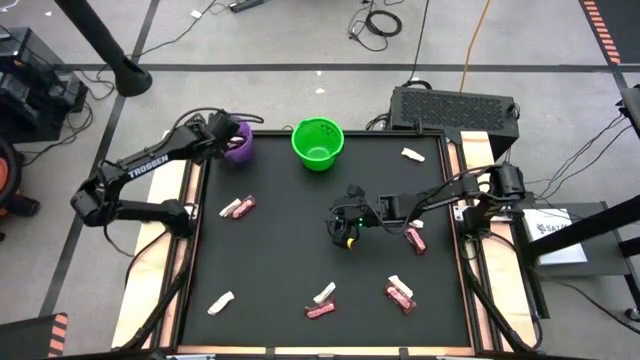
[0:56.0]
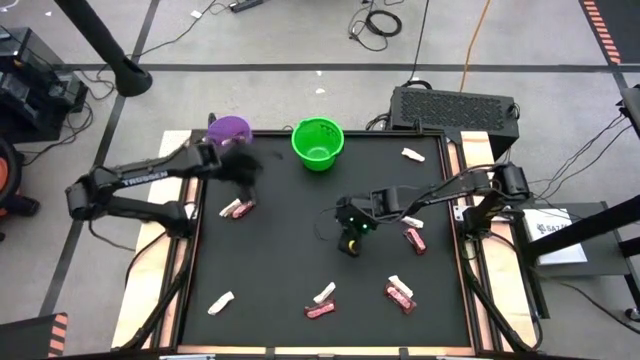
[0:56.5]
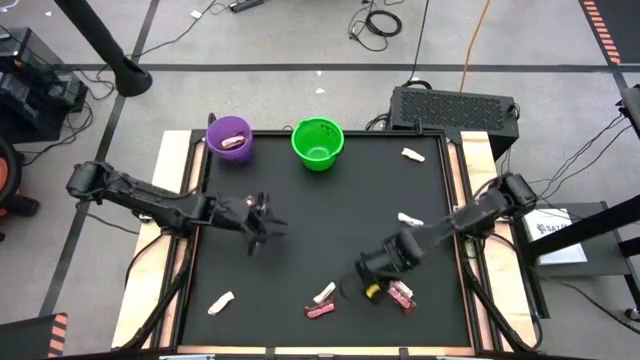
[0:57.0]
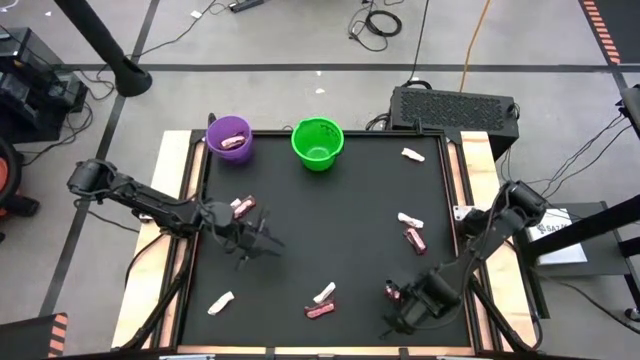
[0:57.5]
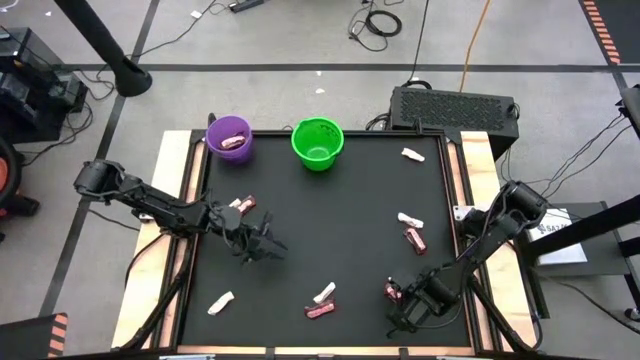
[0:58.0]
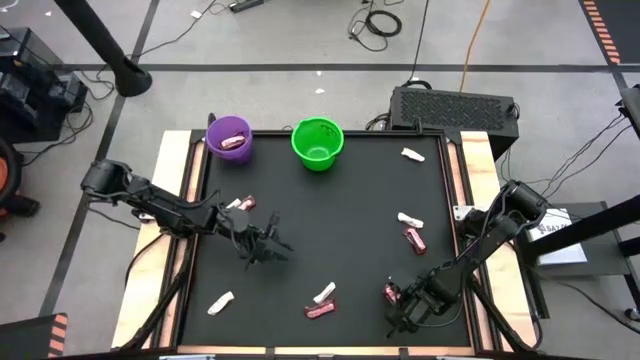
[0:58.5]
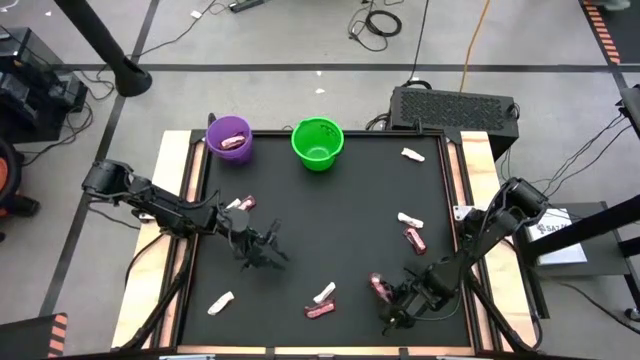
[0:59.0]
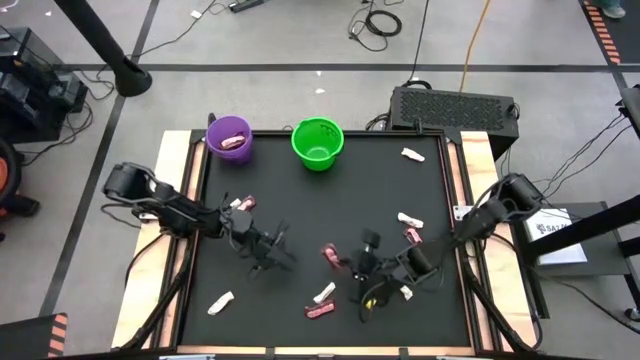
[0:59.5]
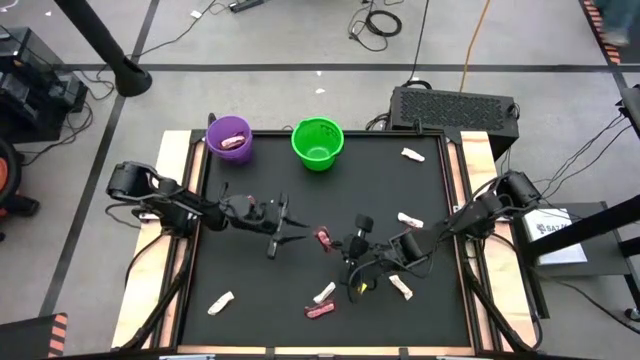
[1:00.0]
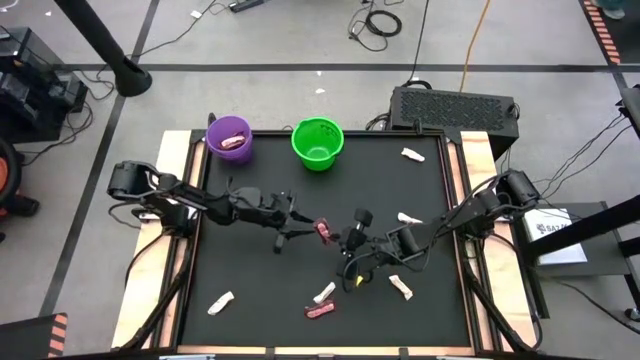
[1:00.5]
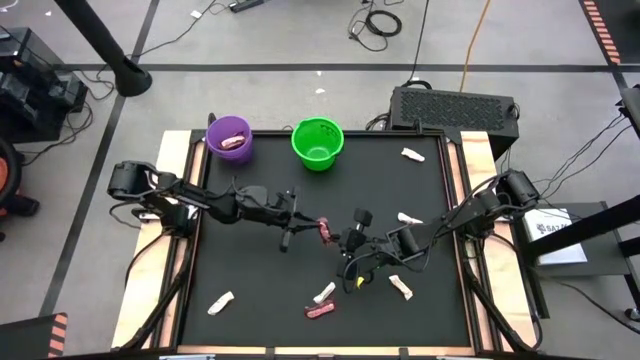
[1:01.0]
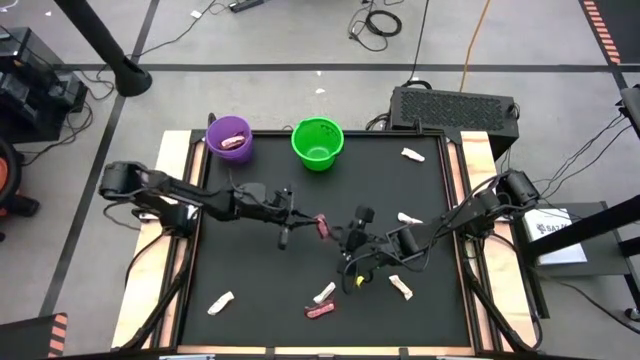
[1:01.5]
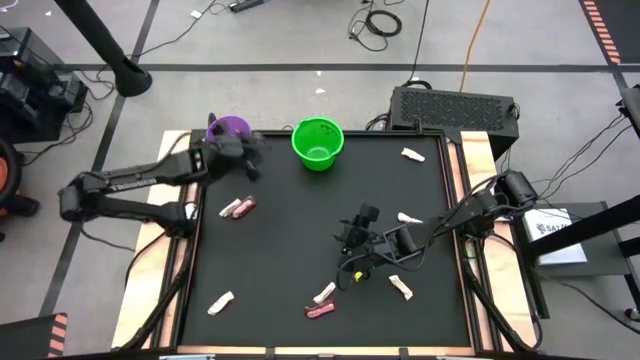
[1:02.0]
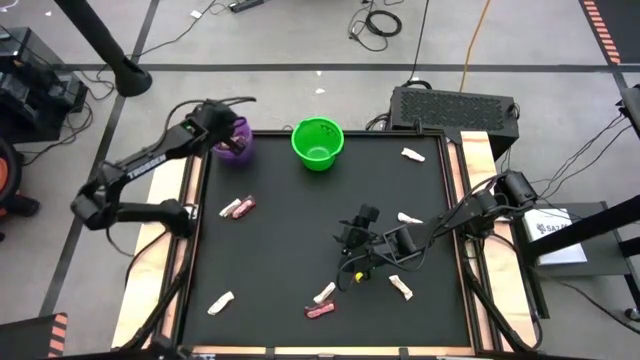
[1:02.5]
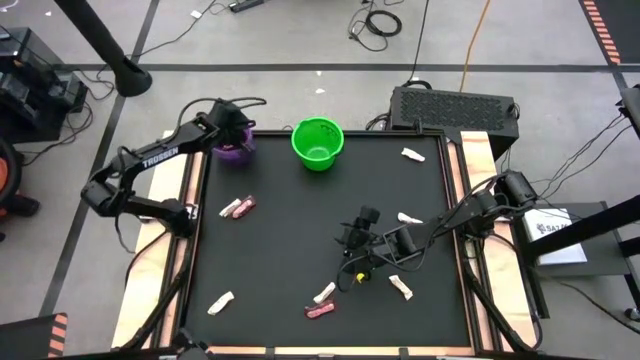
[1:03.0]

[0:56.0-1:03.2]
Task: Sort candy by brand, put in halloween buckets
Put the brown chocolate bar into the purple bucket

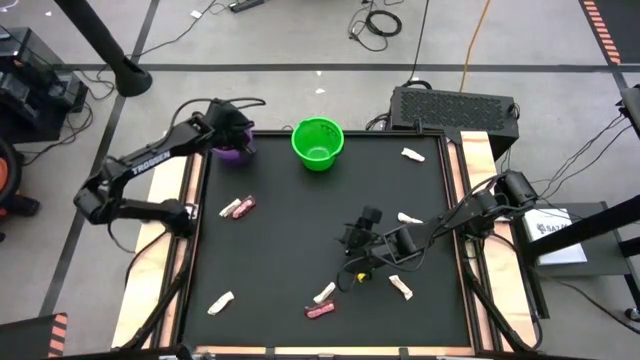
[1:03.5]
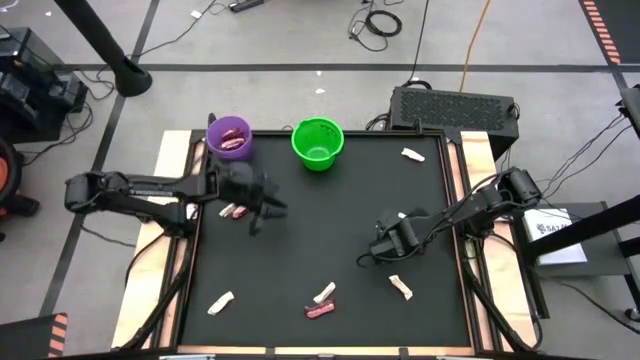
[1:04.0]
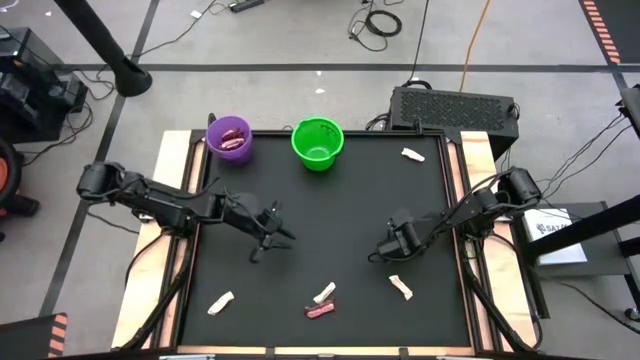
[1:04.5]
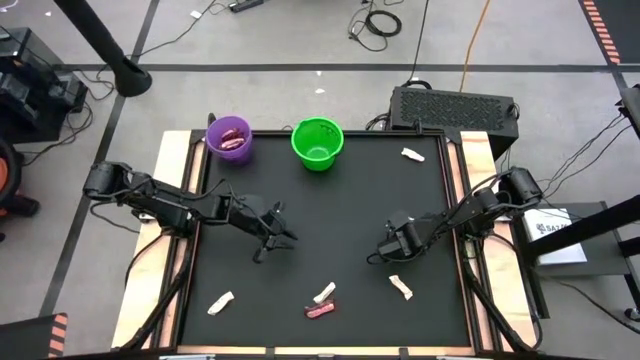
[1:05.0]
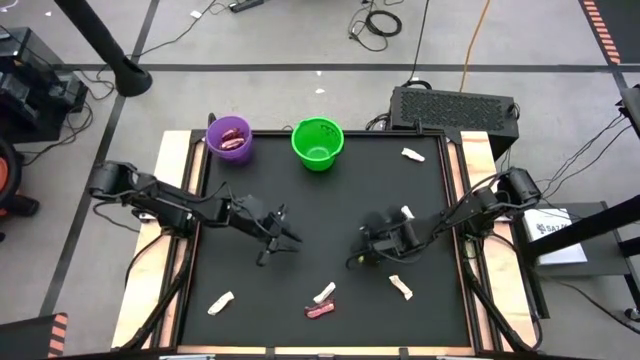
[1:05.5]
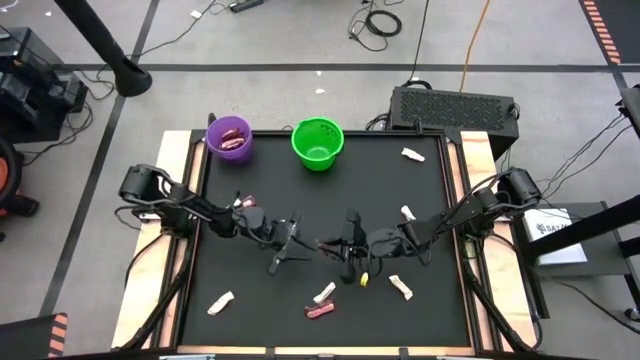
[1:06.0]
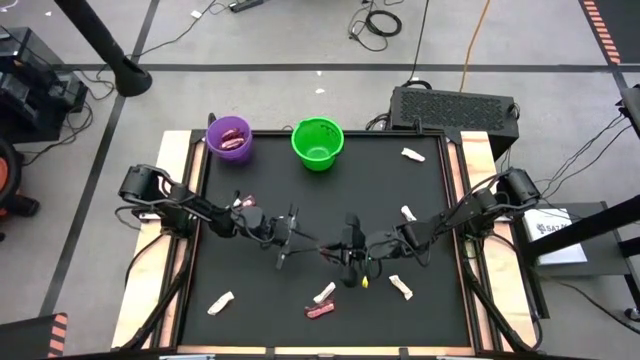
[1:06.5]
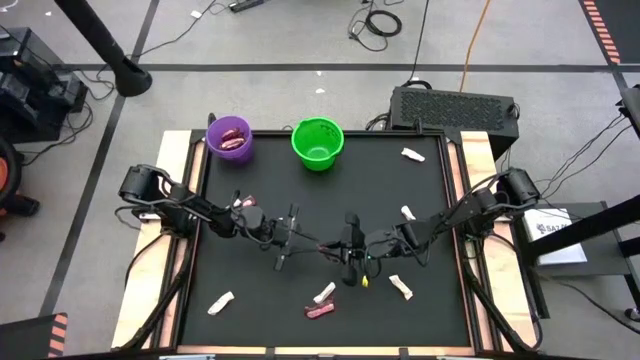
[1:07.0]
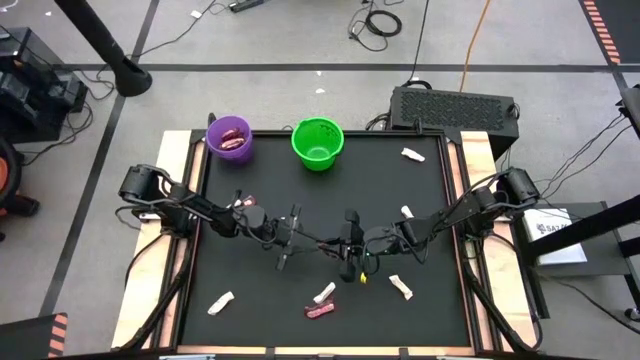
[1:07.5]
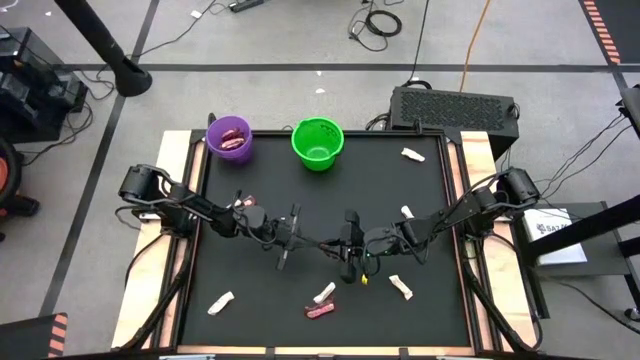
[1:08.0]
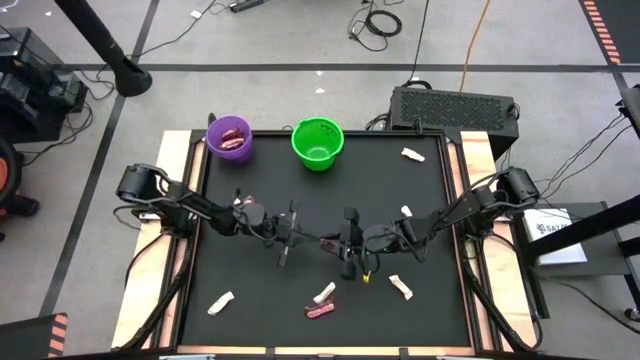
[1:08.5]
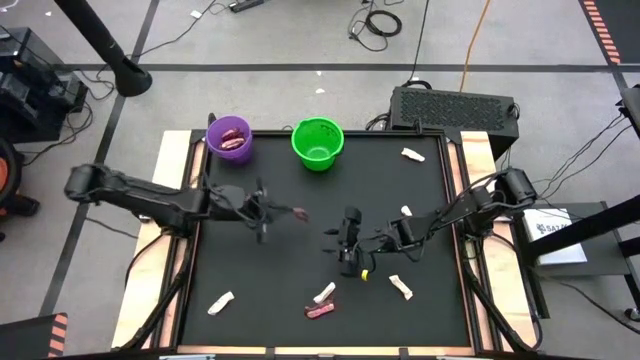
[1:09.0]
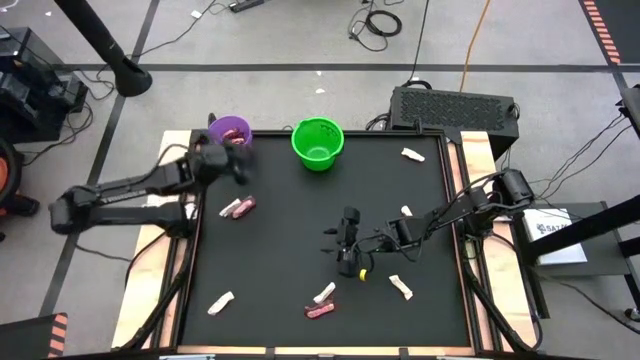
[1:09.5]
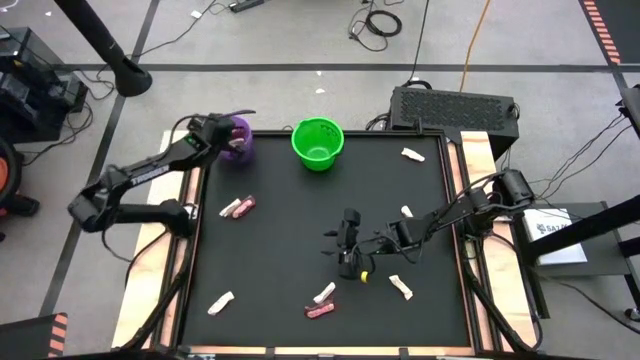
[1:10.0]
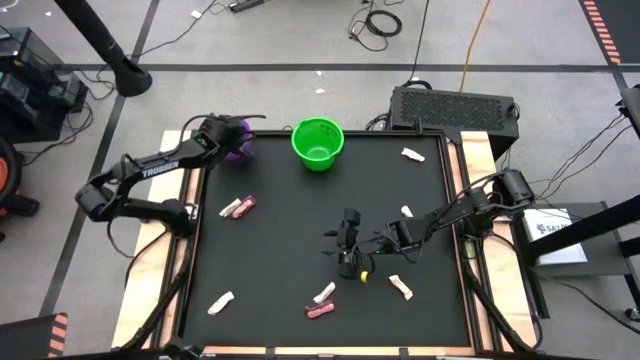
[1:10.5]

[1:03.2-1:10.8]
Put the brown chocolate bar into the purple bucket

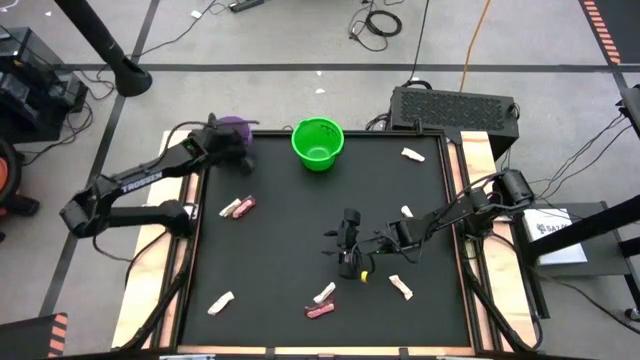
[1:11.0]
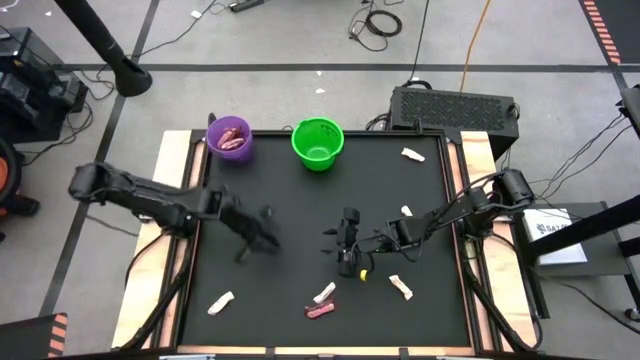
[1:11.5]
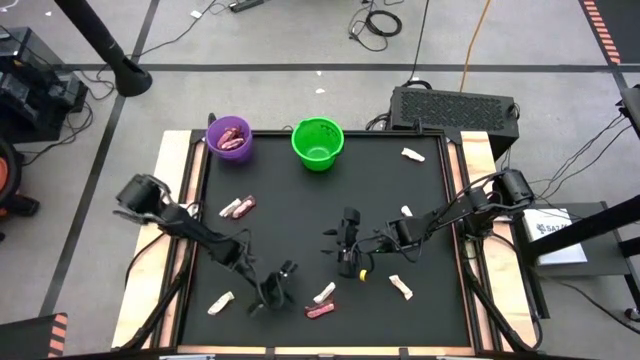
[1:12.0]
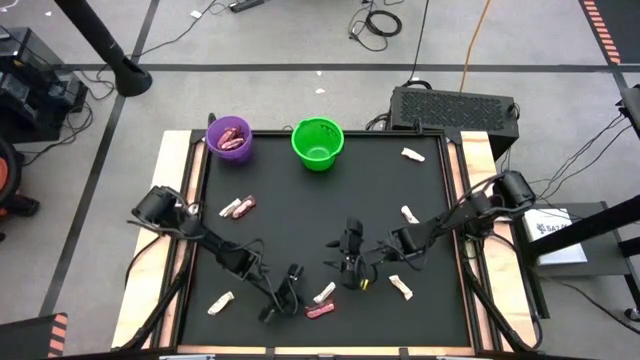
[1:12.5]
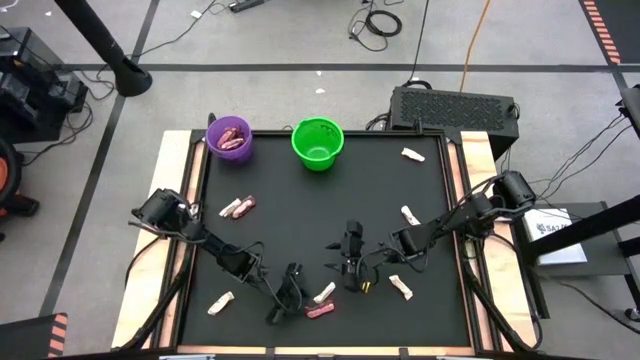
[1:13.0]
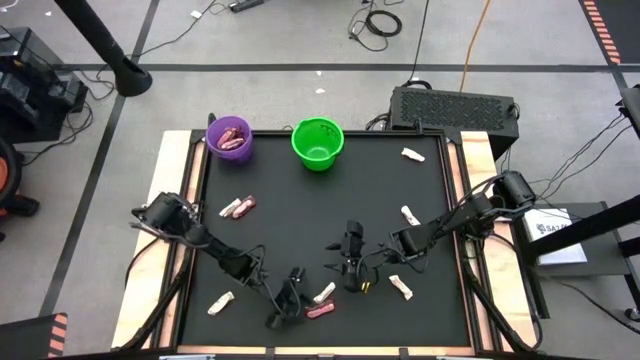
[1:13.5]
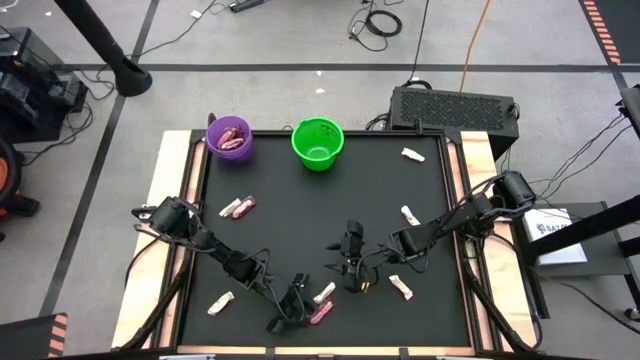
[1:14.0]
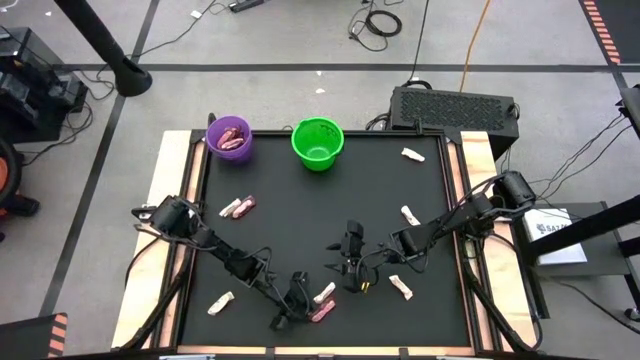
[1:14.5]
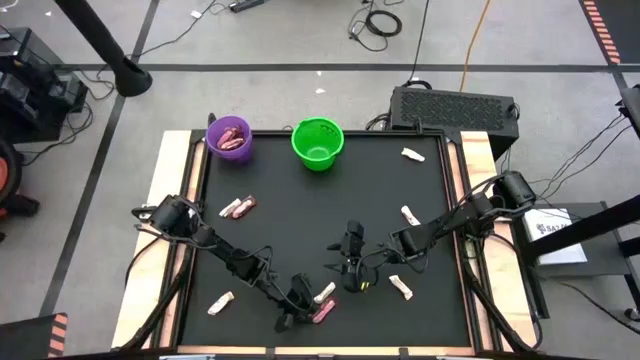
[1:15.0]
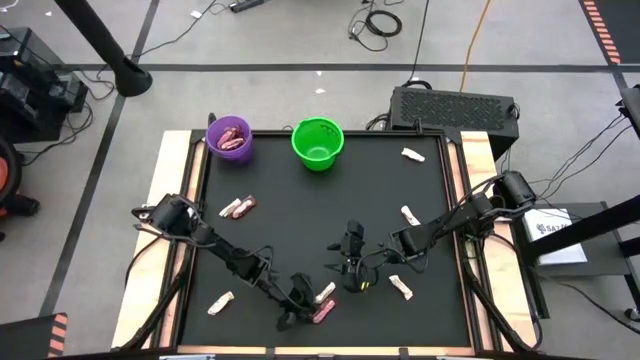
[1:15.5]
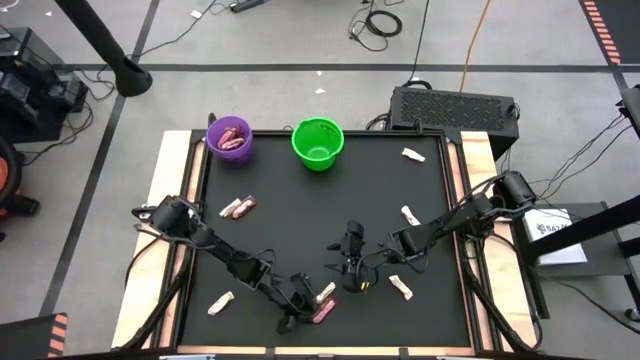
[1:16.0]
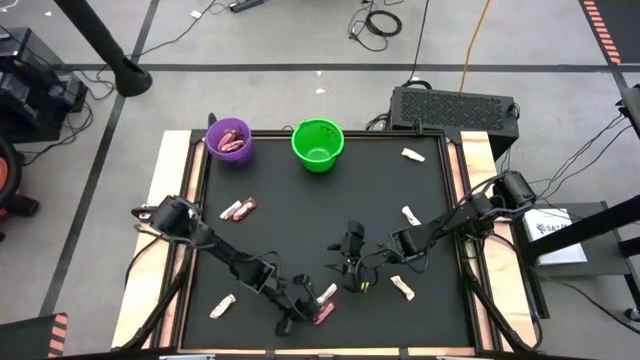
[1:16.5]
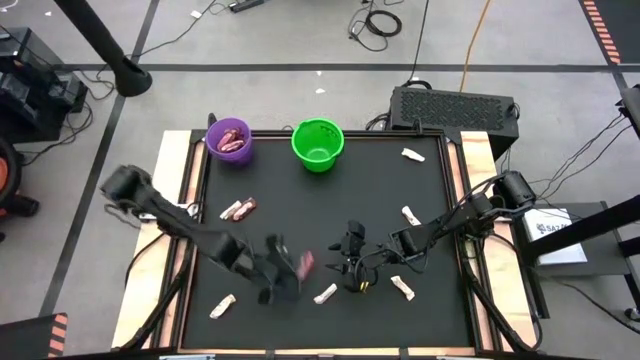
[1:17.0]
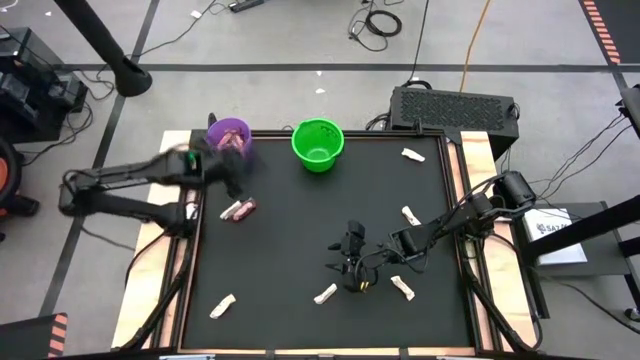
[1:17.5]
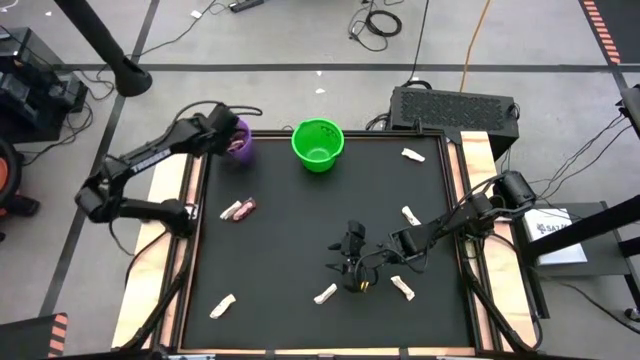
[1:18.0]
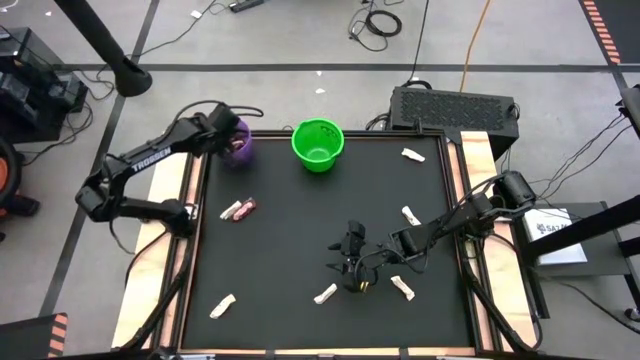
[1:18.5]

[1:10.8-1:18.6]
Put the brown chocolate bar into the purple bucket
